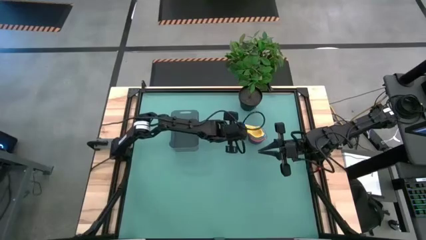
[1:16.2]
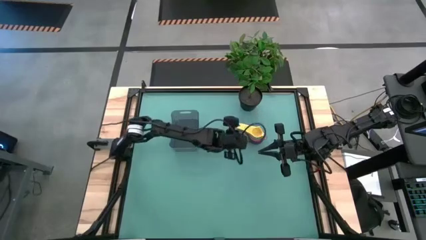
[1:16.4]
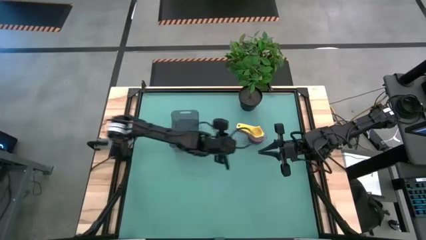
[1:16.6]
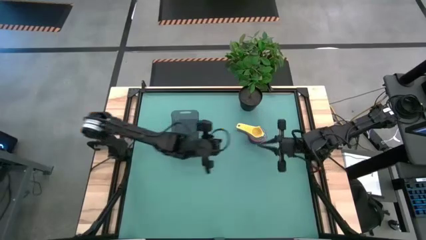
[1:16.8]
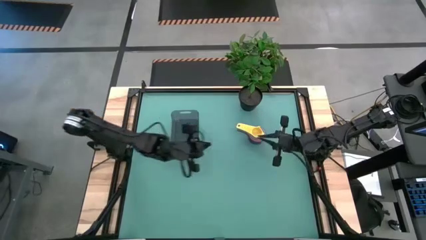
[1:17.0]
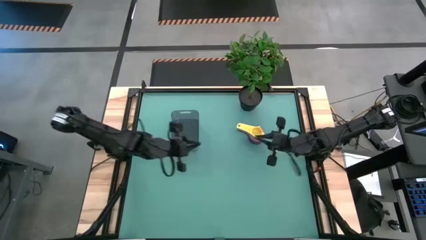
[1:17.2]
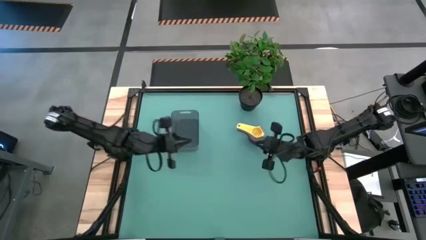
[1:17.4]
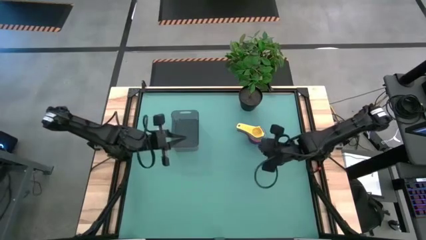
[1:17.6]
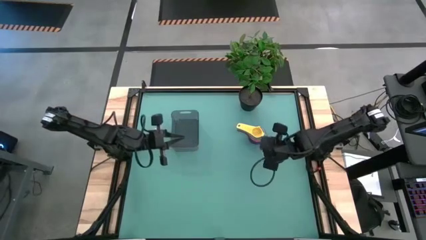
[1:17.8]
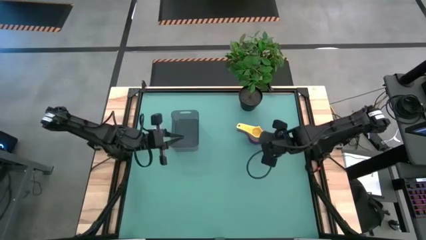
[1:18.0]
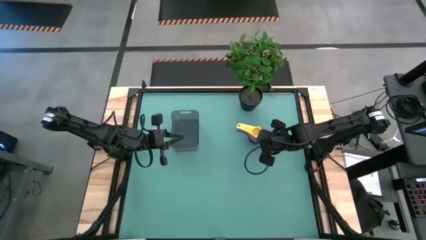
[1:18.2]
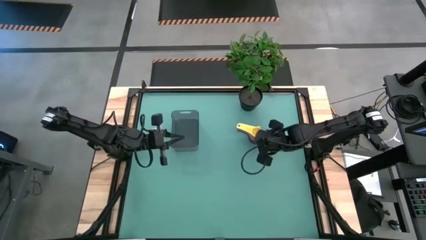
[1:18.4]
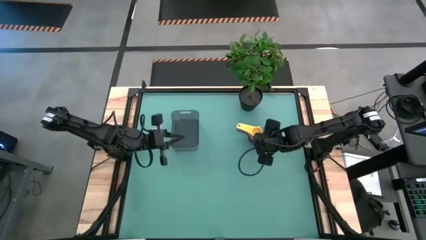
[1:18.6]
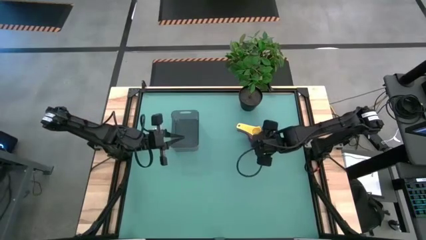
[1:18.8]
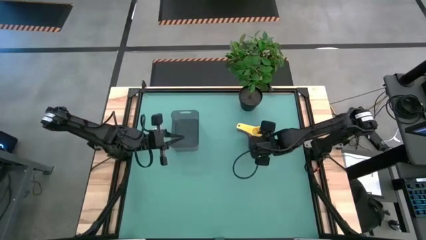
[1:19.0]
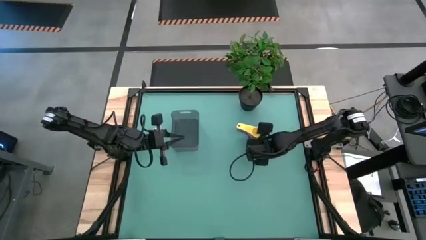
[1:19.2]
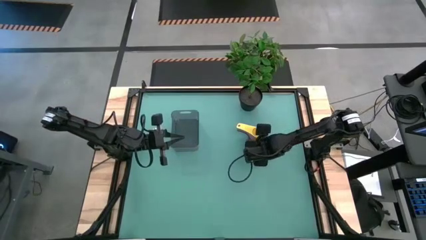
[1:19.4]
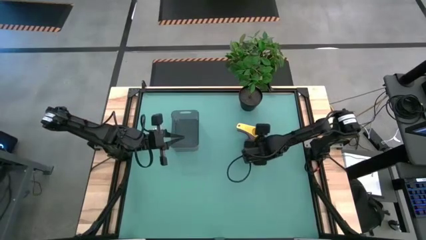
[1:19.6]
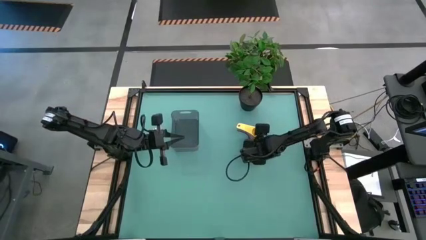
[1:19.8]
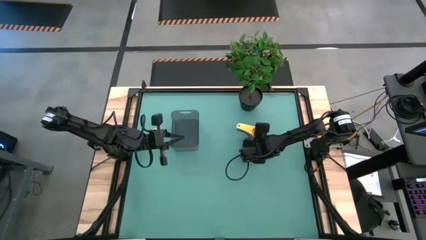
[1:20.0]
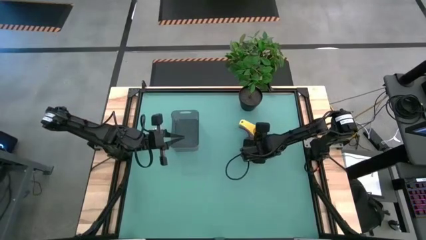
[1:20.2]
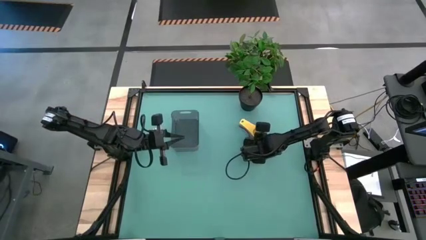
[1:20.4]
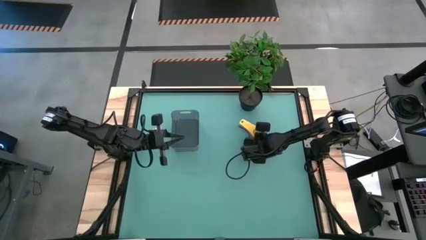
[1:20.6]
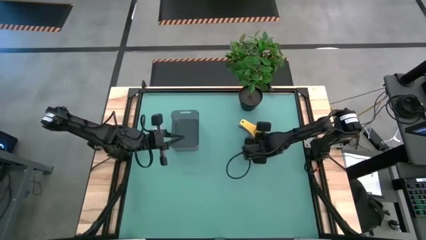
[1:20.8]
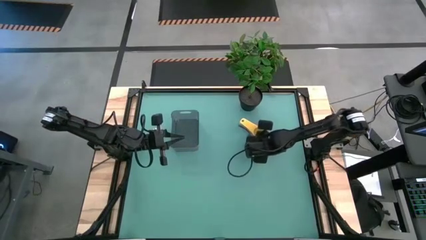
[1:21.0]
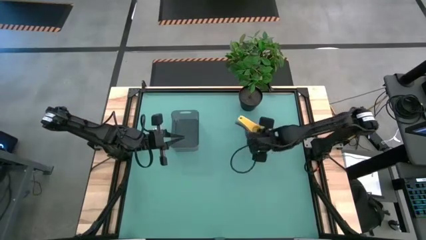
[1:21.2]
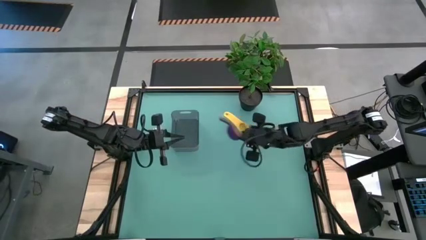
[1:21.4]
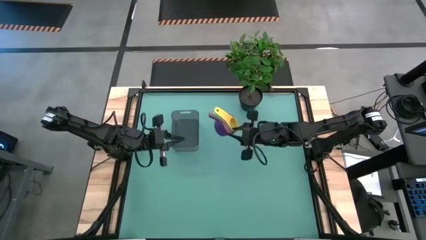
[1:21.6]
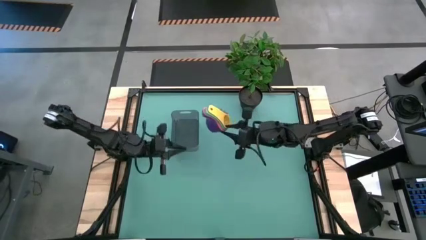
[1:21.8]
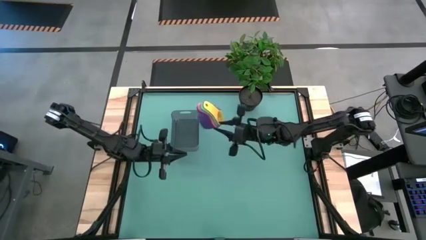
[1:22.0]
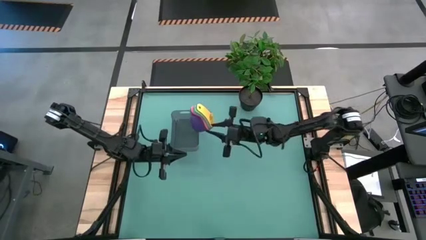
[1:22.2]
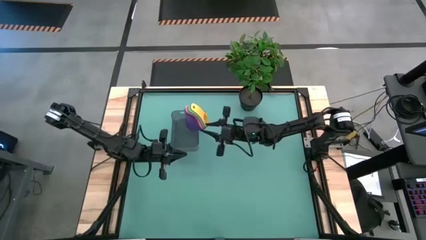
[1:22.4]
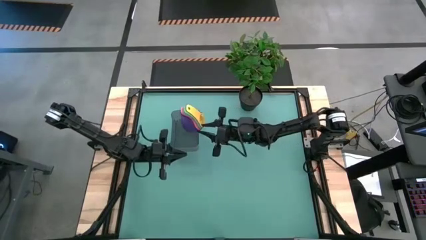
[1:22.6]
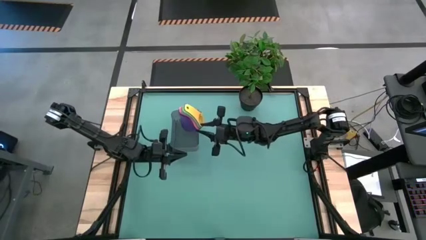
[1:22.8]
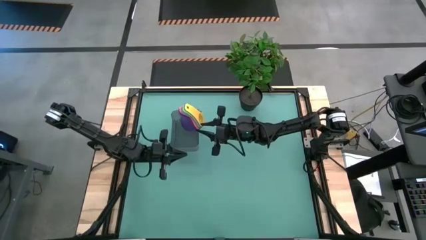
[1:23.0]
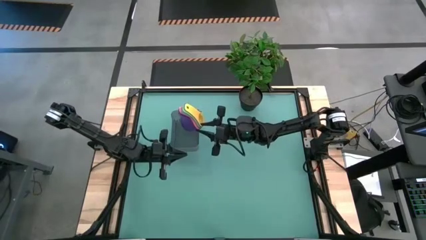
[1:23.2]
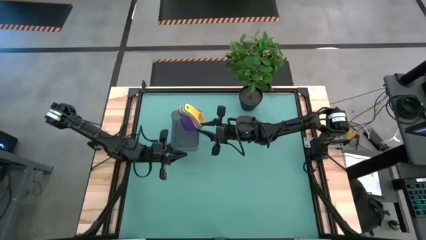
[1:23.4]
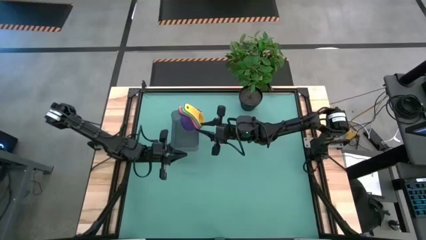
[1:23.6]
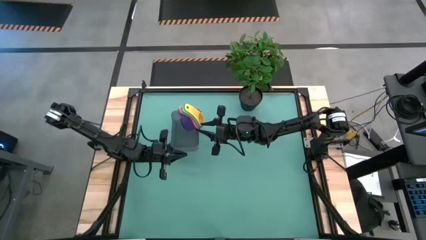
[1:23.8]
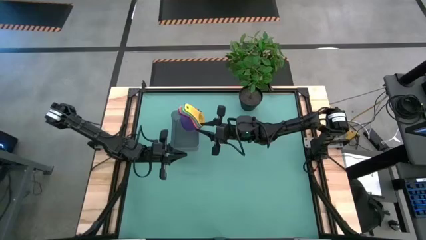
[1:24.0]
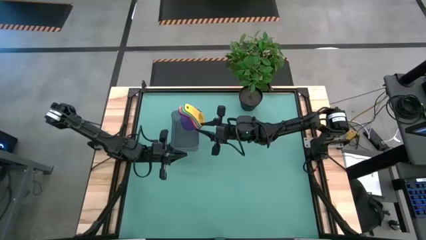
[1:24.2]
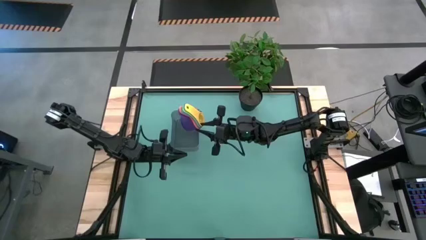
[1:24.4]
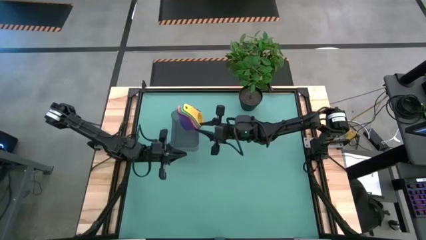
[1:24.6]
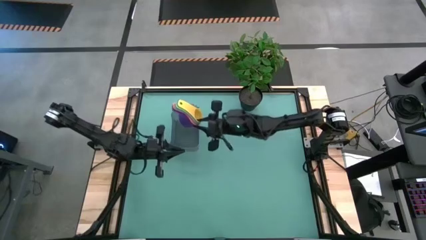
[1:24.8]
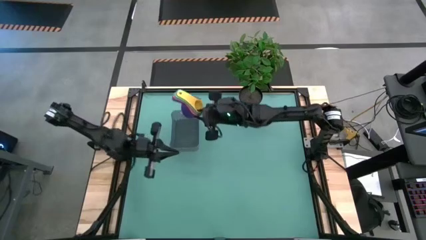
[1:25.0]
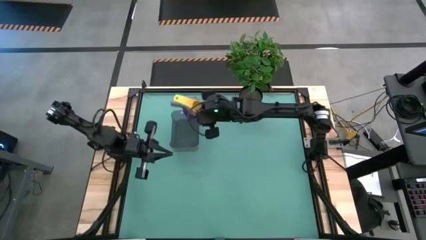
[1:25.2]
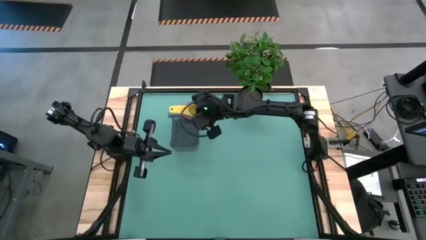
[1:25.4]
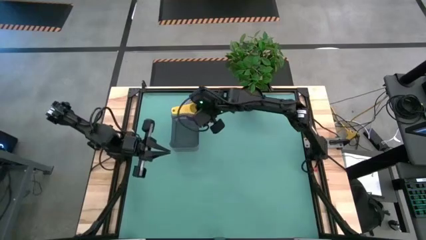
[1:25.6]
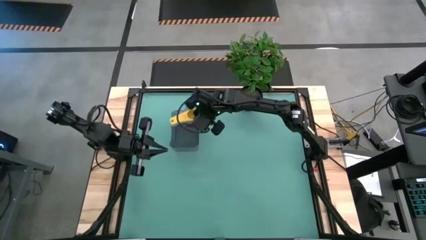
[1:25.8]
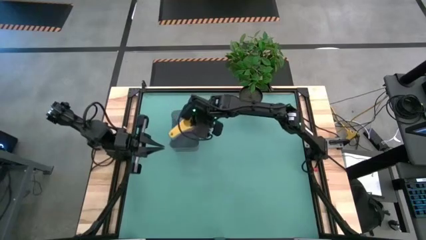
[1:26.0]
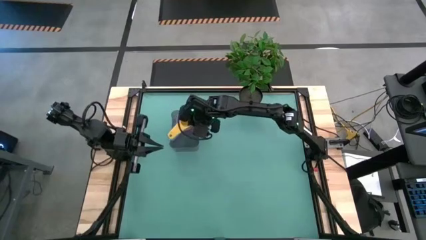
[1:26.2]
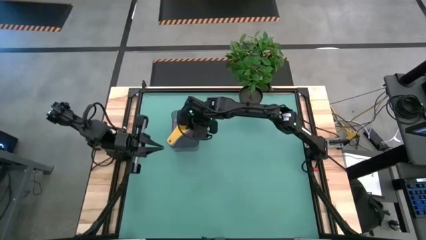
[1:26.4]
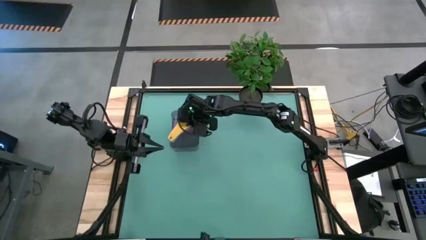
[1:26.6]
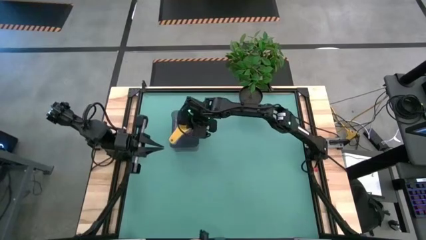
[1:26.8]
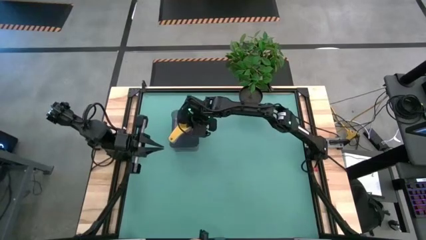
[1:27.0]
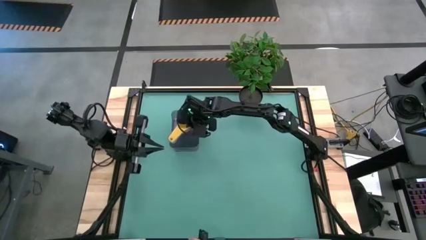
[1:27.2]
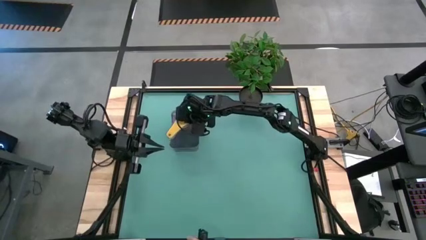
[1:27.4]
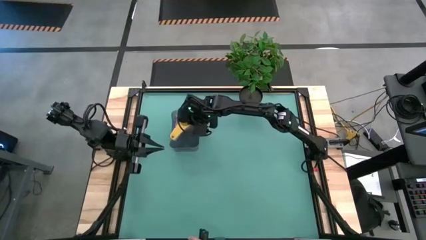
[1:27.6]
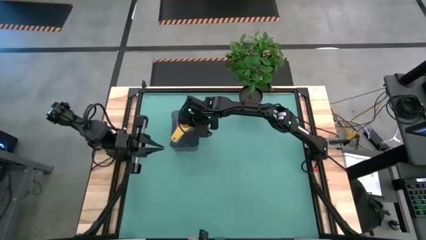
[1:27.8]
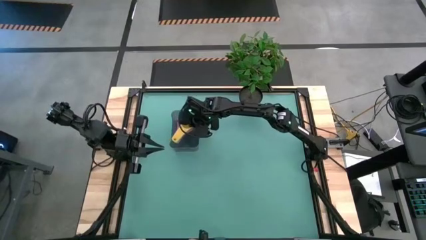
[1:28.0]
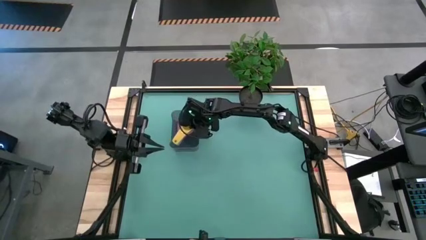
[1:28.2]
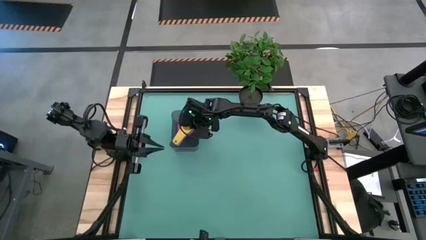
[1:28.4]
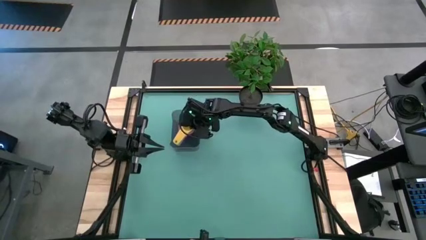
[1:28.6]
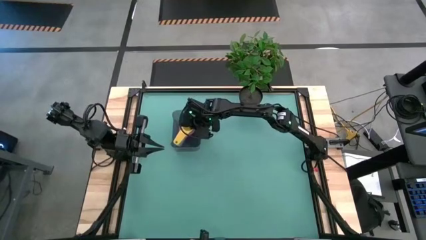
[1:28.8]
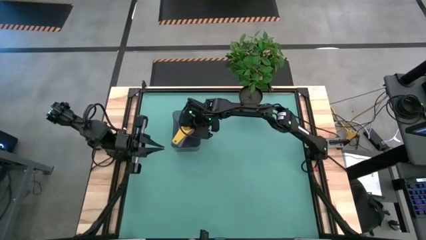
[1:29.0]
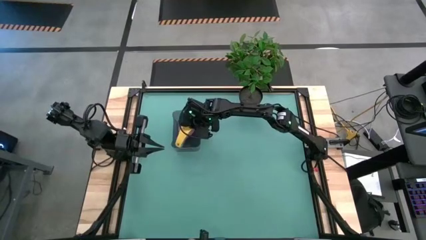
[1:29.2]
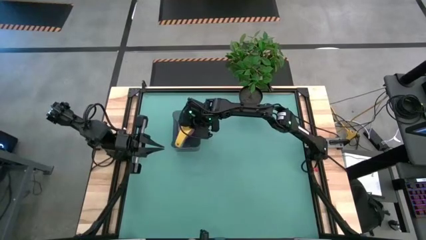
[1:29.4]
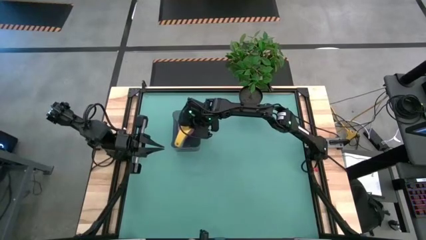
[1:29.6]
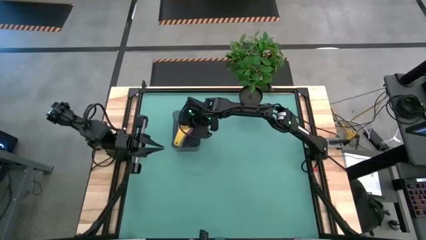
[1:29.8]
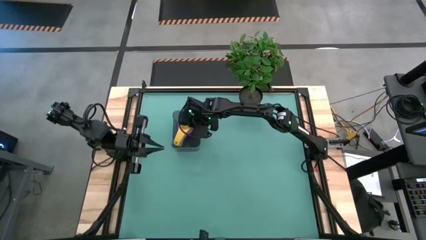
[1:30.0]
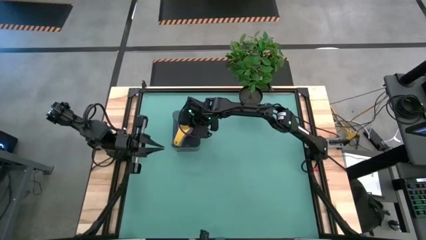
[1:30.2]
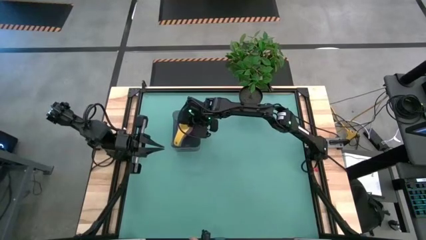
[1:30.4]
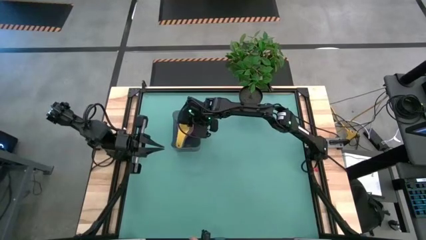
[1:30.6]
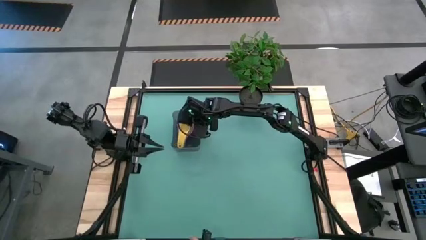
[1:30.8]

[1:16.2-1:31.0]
Task: Nest measuring cups in basket
Put the stacked measuring cups into the black bin
